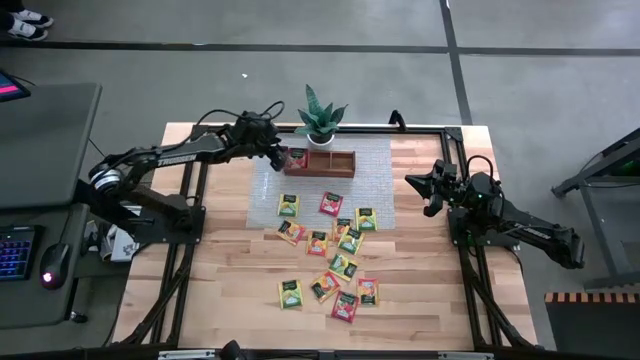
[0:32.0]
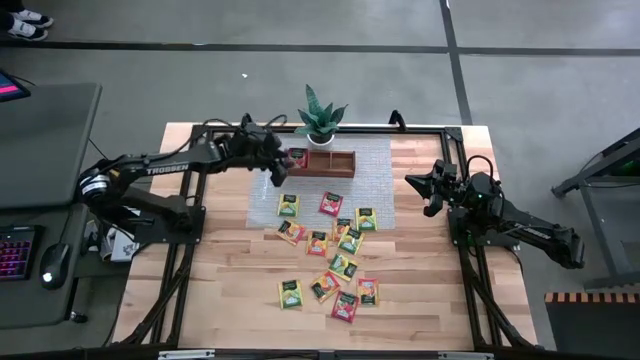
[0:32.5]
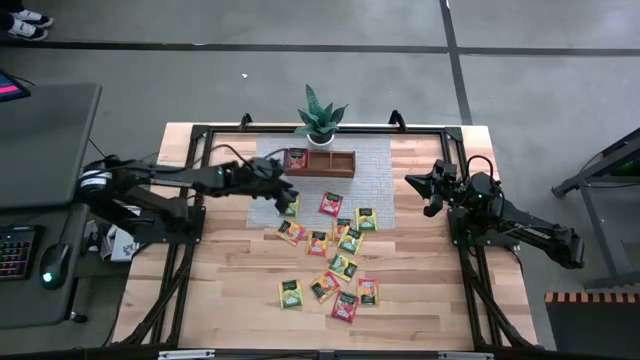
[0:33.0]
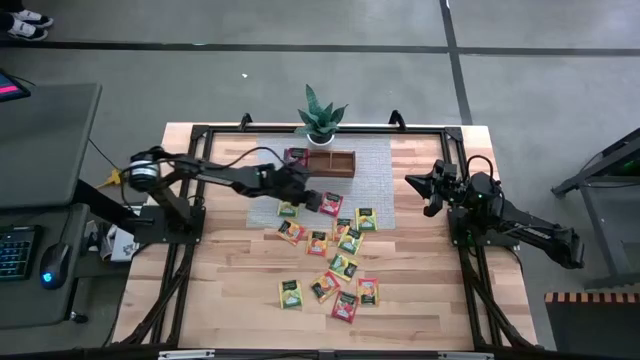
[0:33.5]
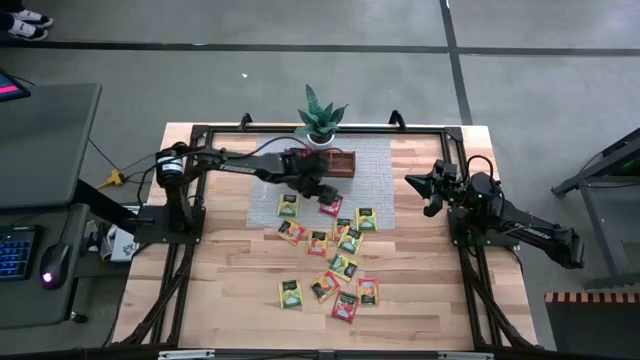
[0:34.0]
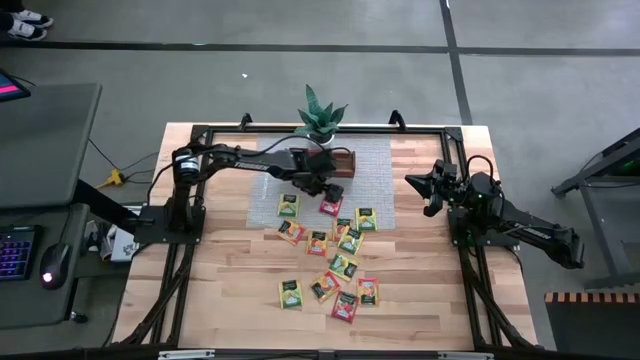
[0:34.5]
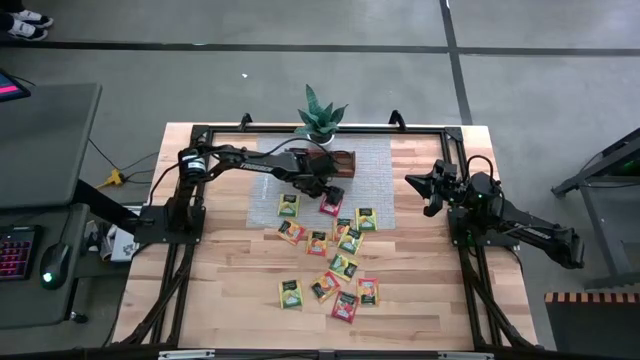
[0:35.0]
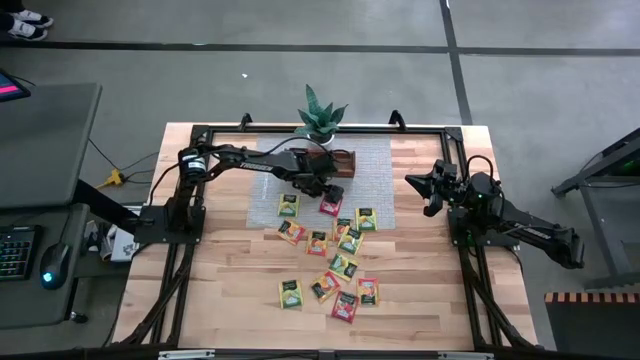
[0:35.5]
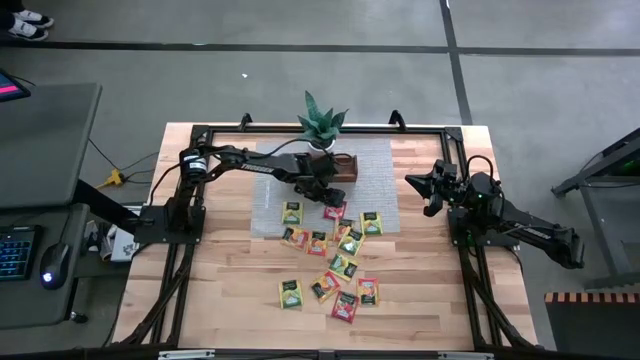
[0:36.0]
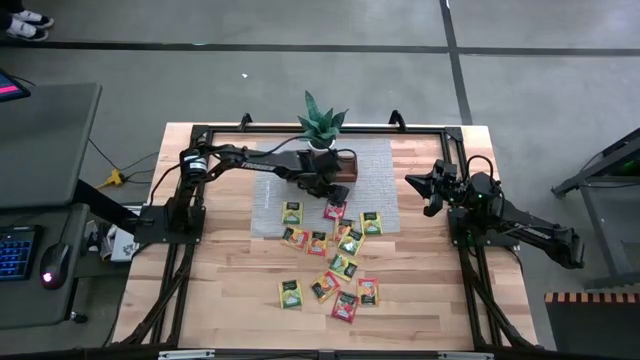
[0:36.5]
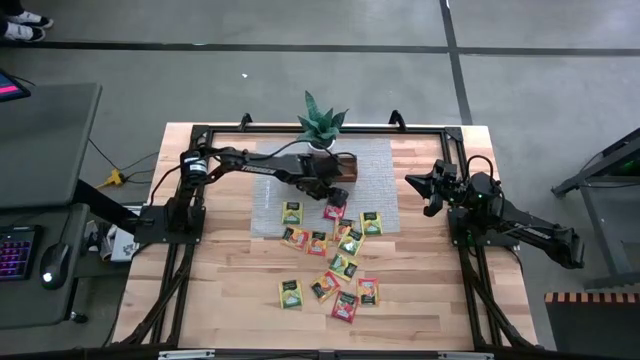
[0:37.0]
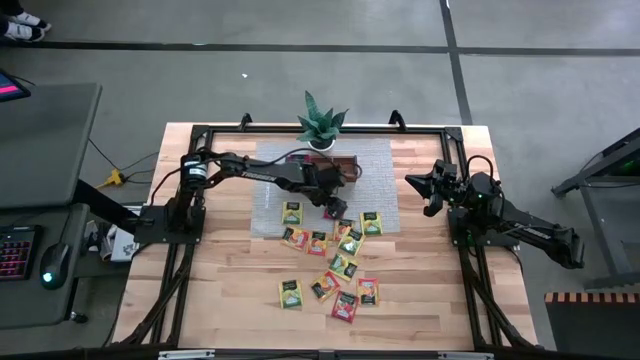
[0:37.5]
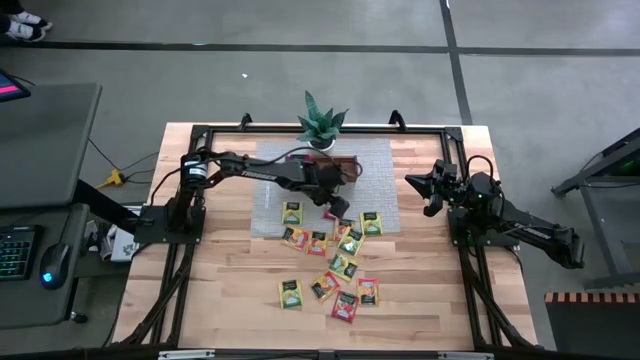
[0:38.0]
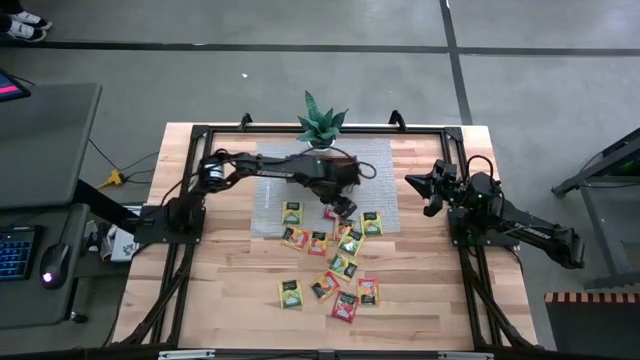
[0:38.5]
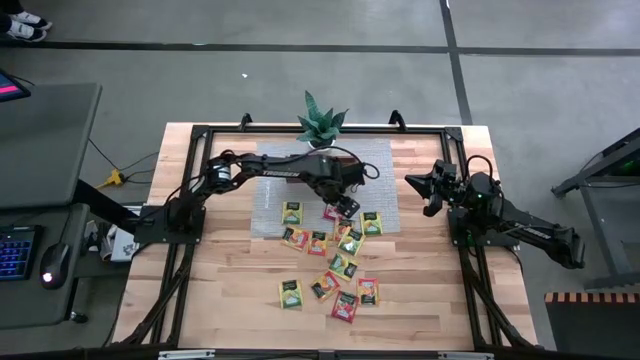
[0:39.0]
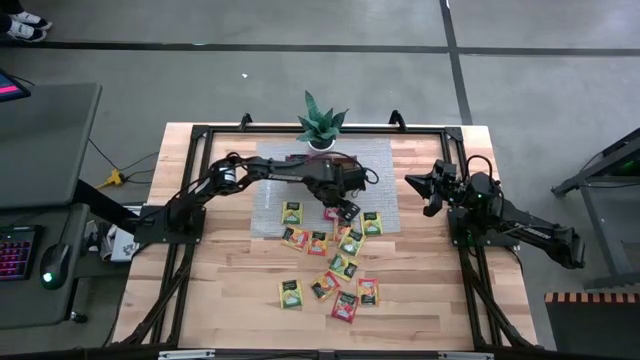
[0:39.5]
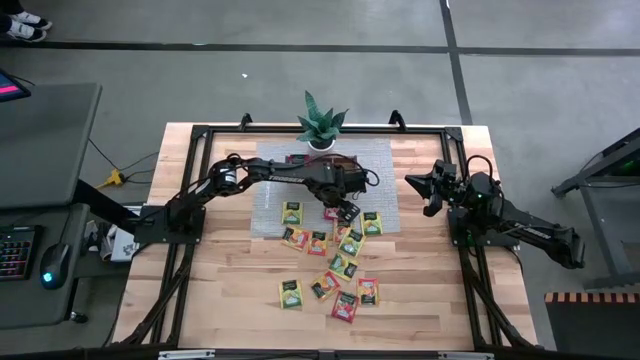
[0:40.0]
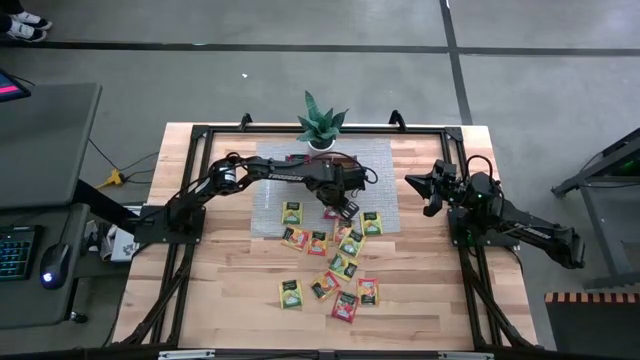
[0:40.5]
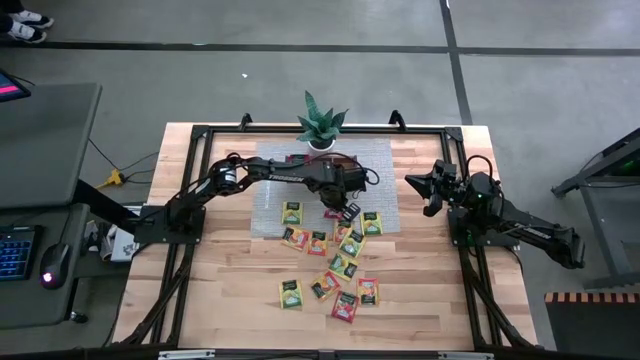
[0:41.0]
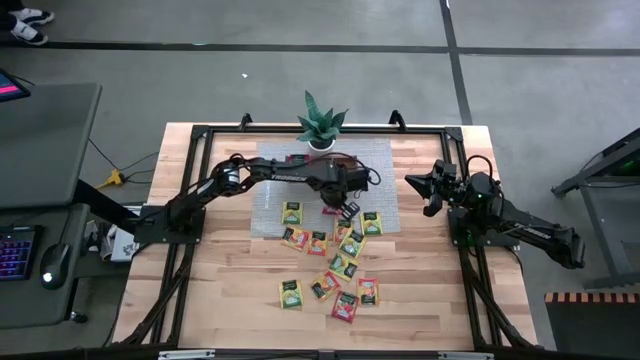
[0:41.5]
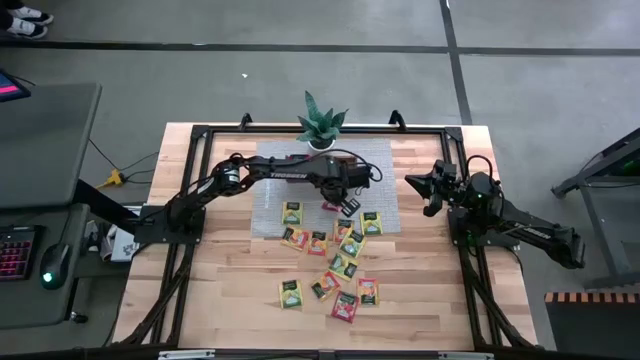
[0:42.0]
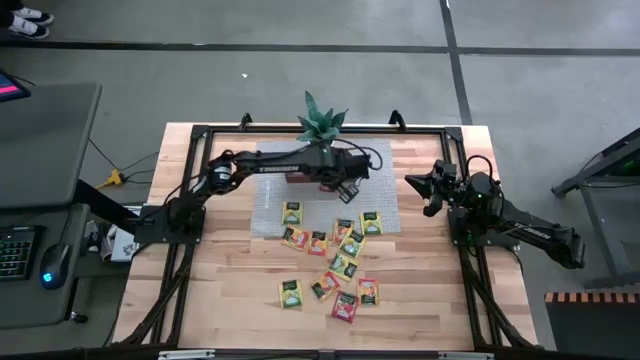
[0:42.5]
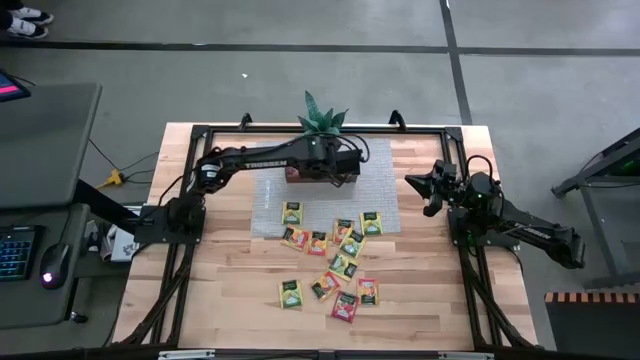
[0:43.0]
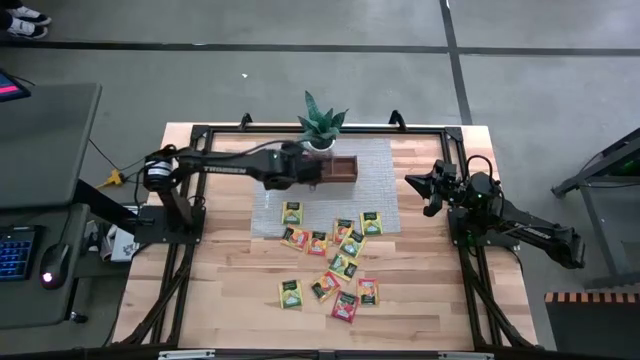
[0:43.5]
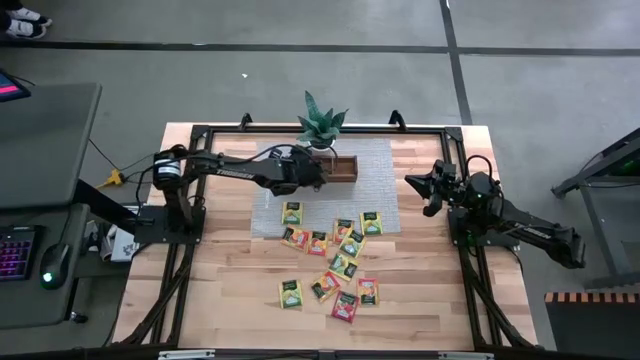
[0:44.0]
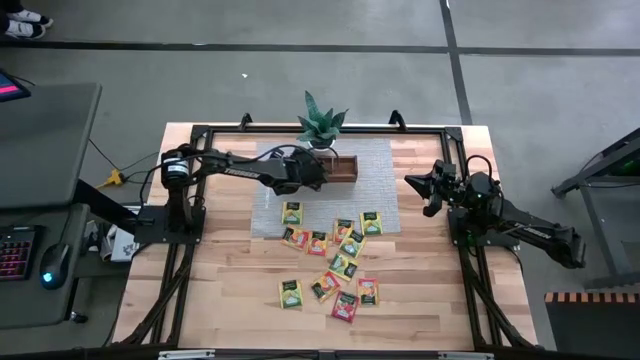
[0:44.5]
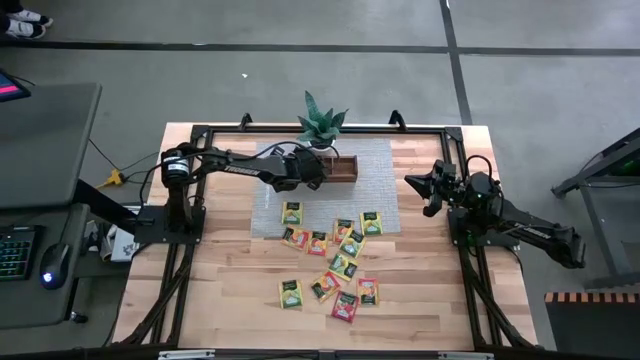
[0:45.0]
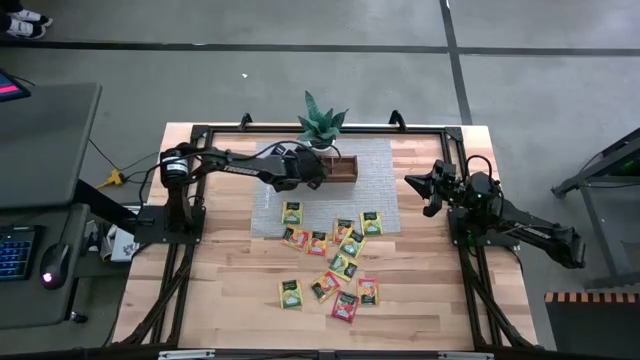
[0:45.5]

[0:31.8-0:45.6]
Task: Pick & Place Tea
Put the red tea bag into the left section of the wooden organizer

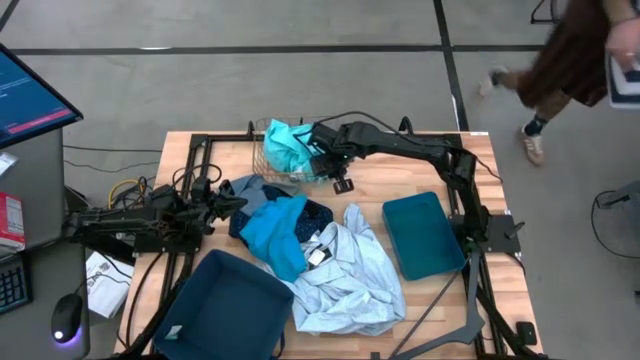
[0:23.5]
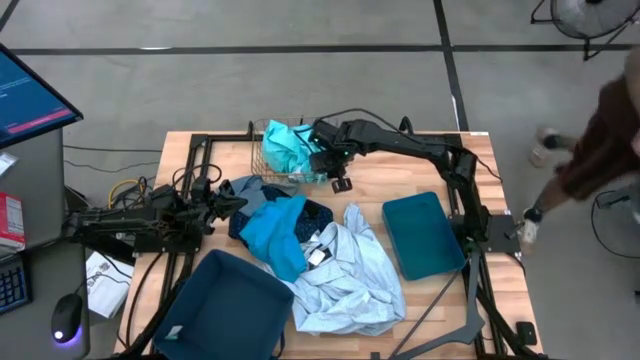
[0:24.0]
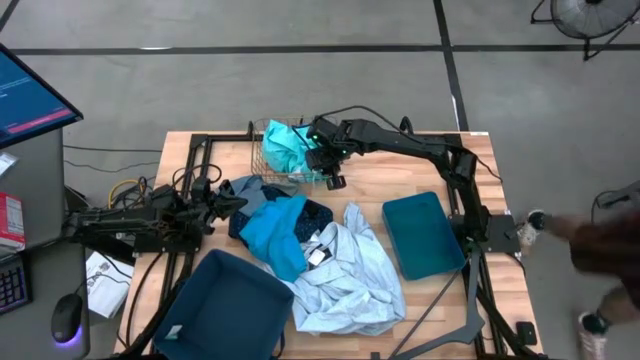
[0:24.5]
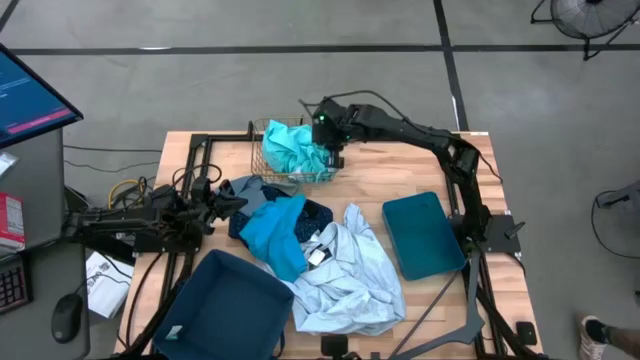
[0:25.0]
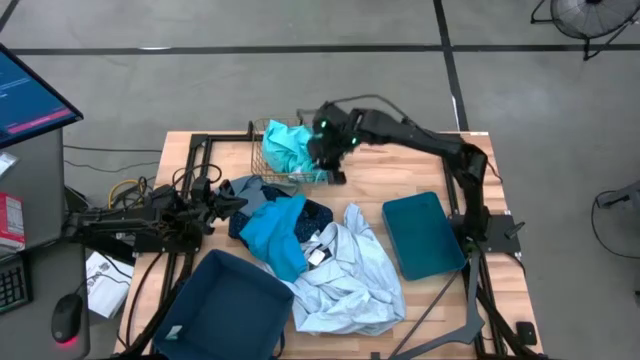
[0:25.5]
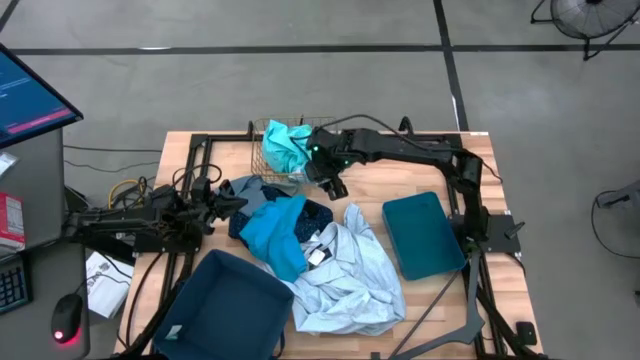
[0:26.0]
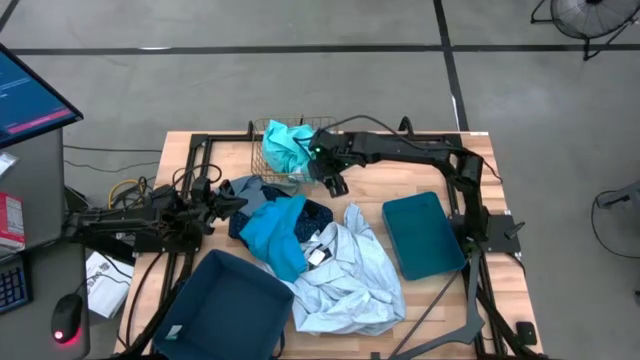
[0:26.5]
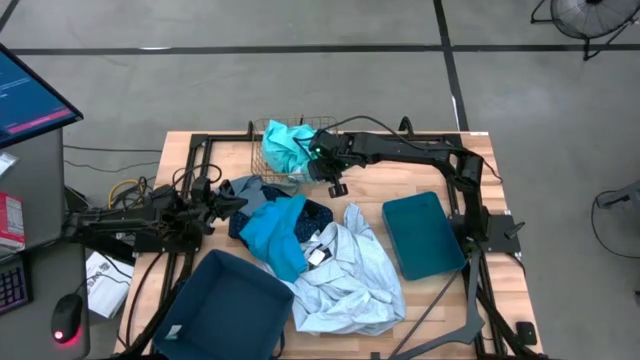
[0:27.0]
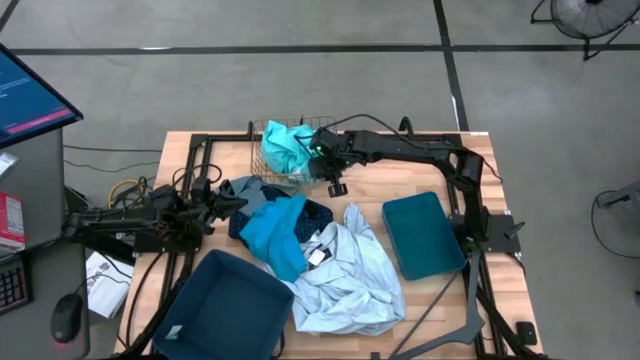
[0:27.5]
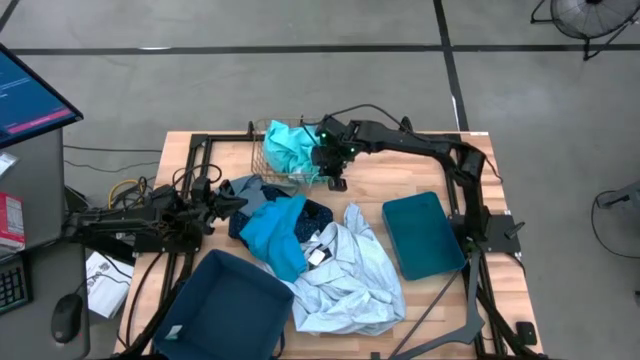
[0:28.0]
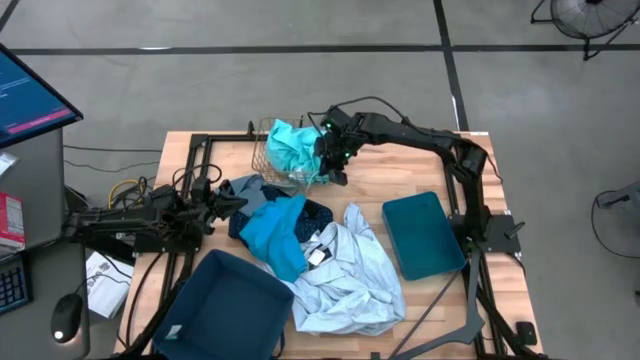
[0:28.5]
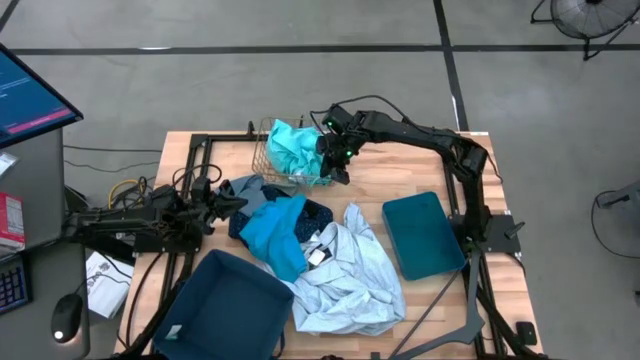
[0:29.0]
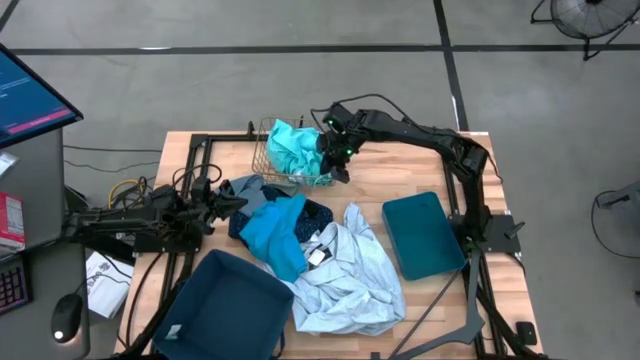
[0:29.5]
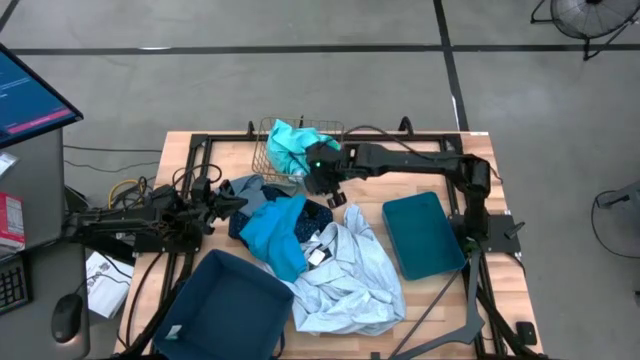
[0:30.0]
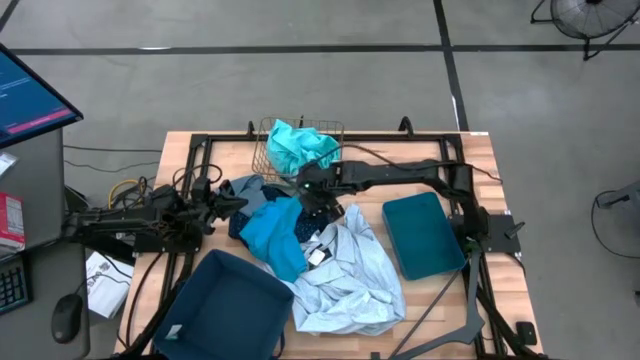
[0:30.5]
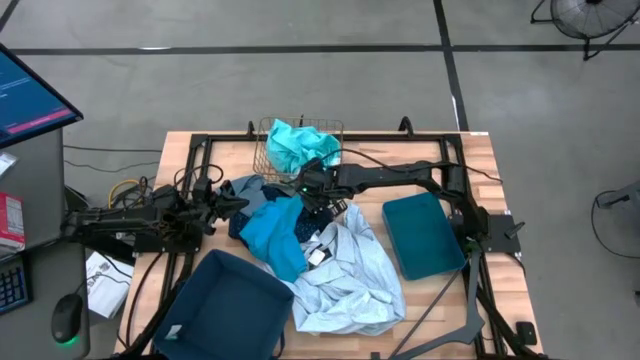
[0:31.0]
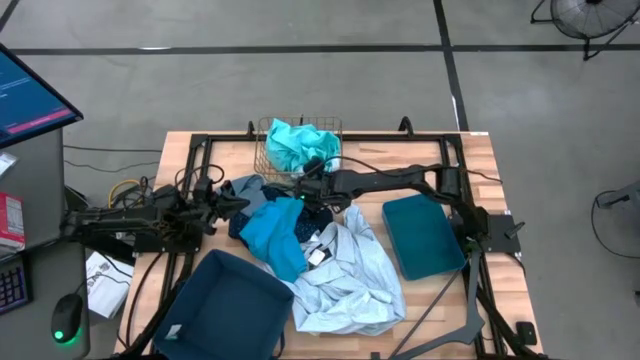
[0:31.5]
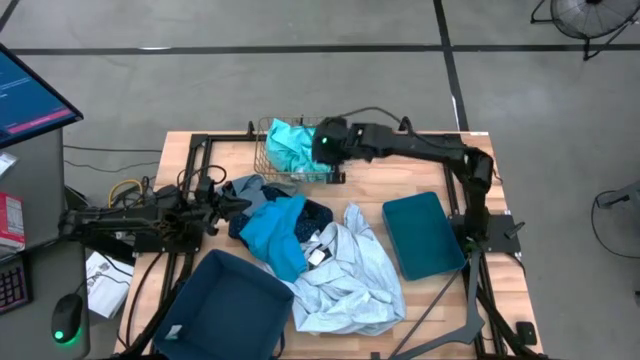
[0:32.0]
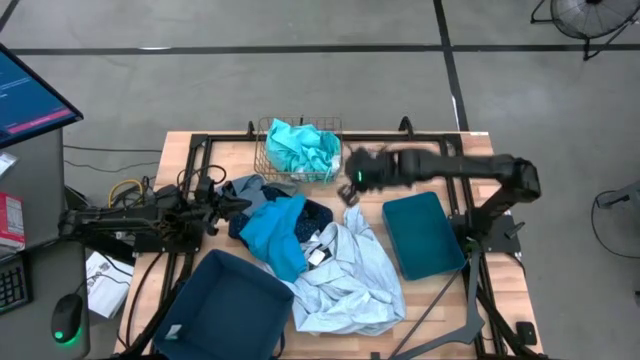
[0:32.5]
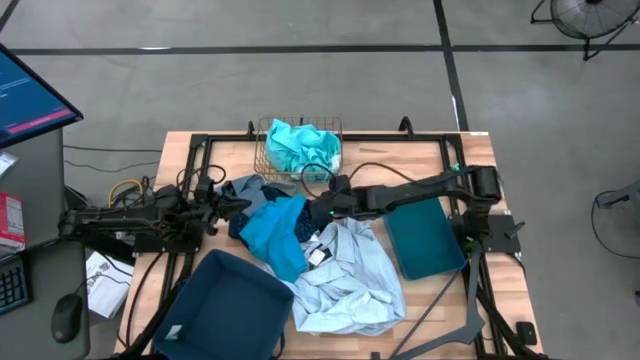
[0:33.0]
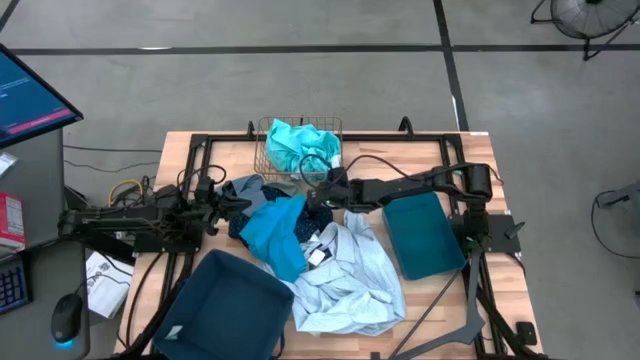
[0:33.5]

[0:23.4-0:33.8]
Task: Pick & Place Cloths
Put the light blue short pants into the gold wire basket
